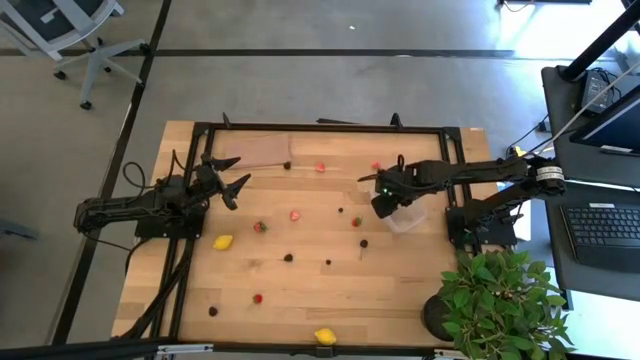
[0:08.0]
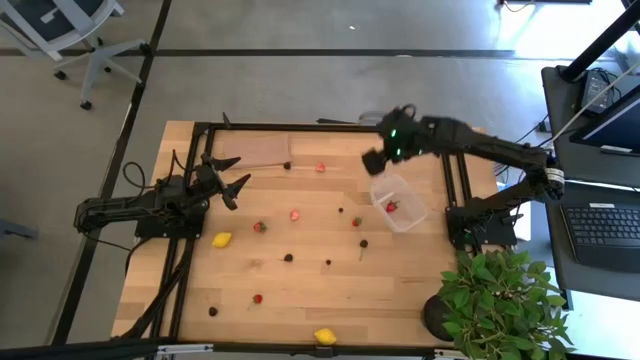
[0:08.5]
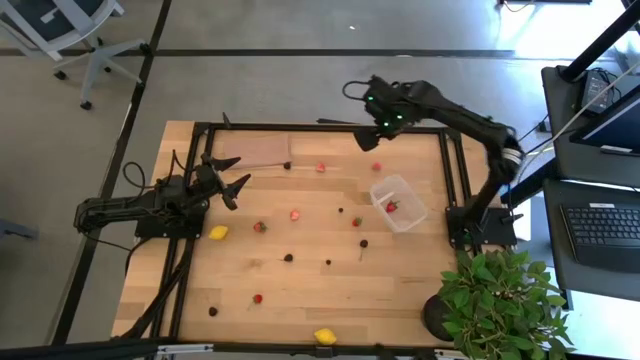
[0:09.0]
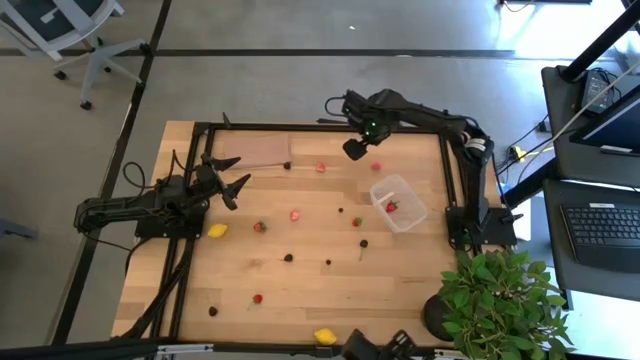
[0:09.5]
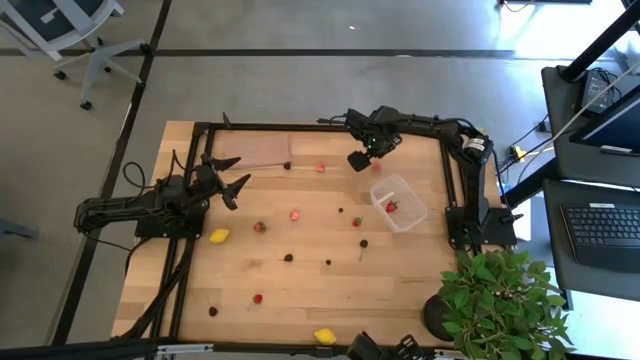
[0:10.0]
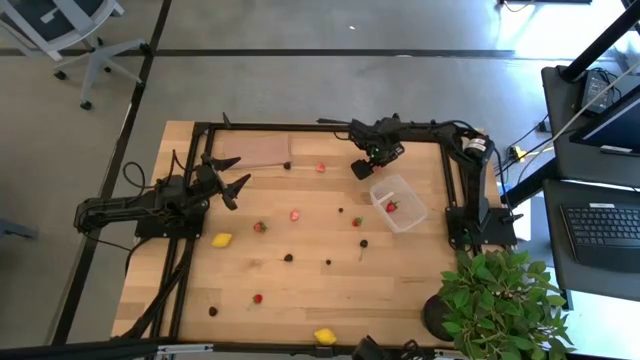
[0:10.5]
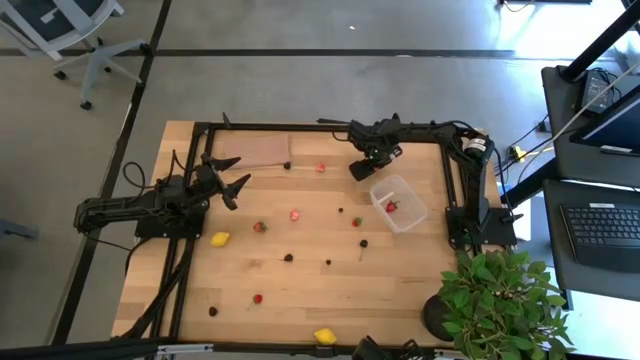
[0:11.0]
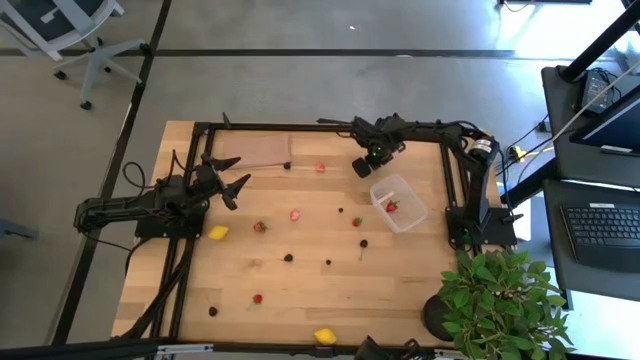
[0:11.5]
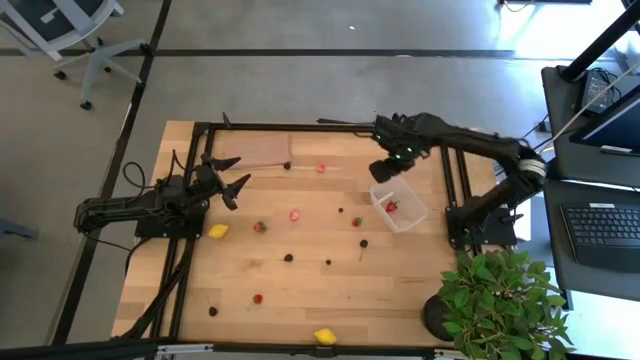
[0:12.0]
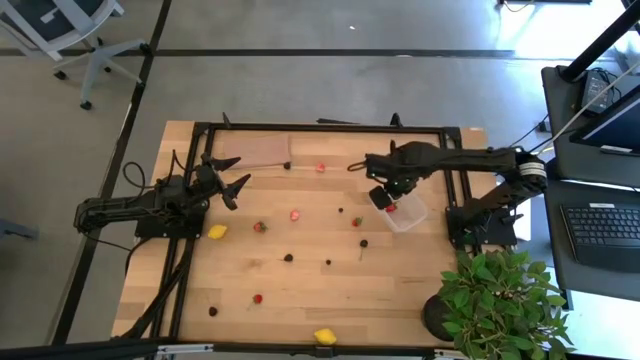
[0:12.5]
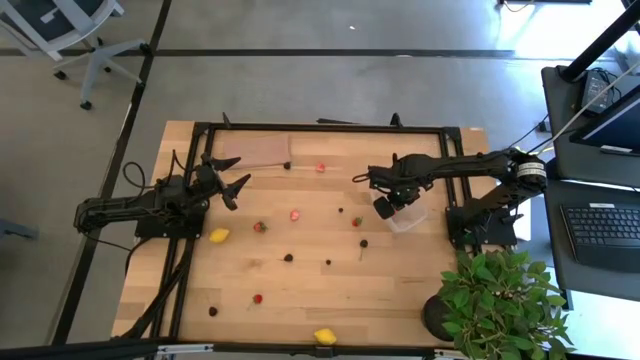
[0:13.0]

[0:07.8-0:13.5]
Task: Pick and placing Produce into tupperware
Put the peach into the transparent bin

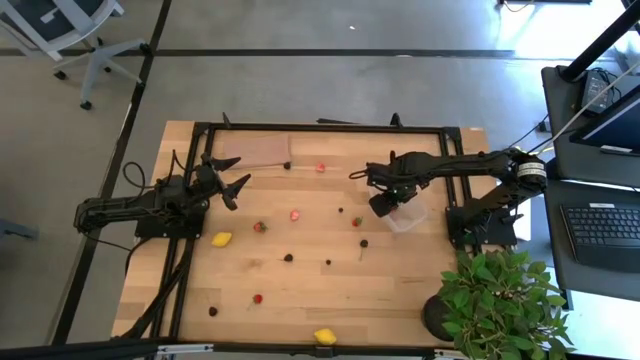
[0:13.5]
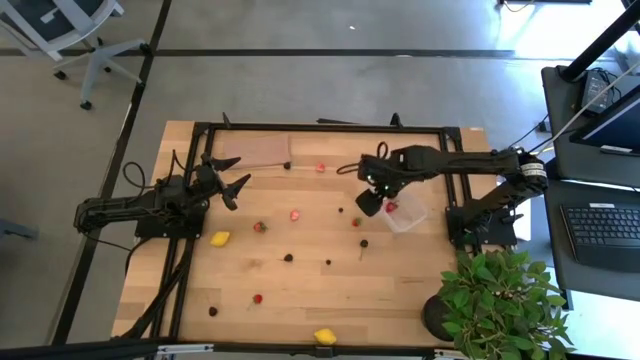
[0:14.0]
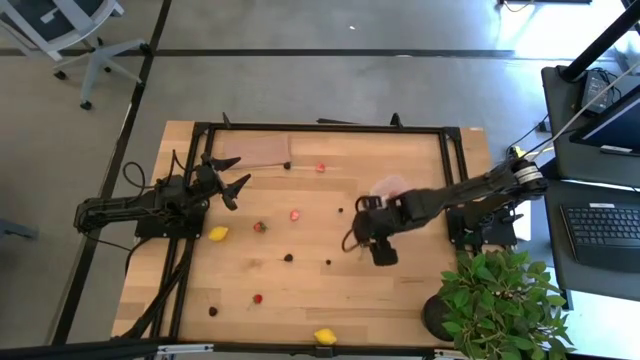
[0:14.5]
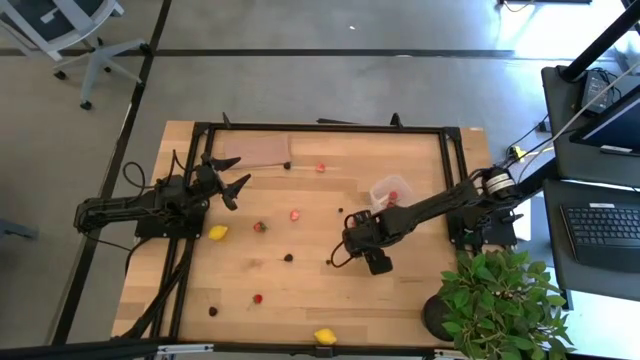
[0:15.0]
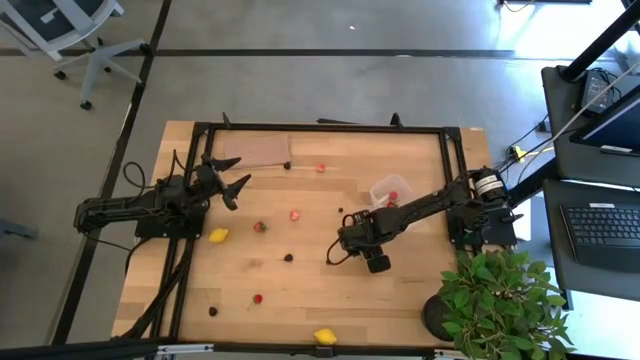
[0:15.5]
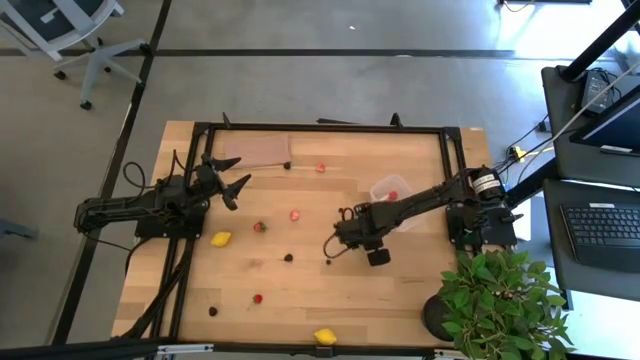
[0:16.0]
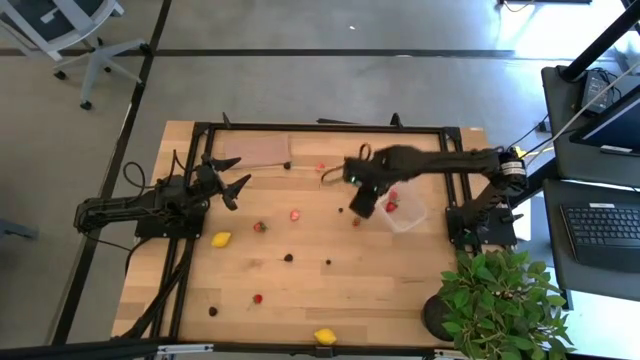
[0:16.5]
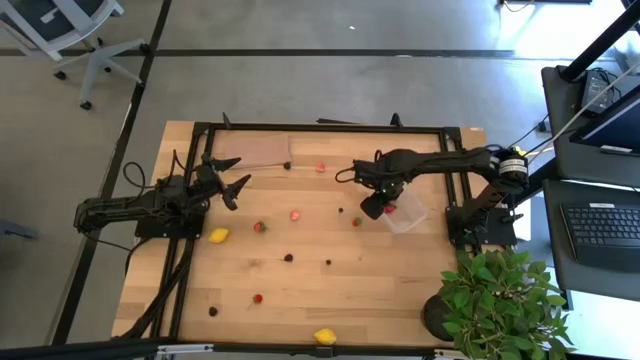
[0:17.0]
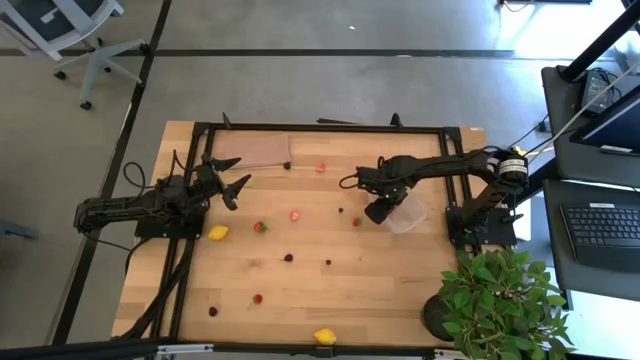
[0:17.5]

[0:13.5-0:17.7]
Put the black cherry into the transparent bin

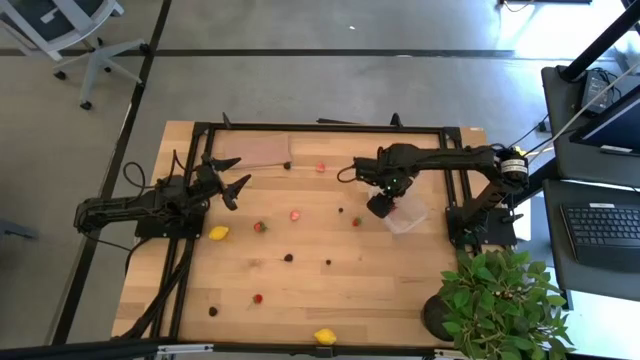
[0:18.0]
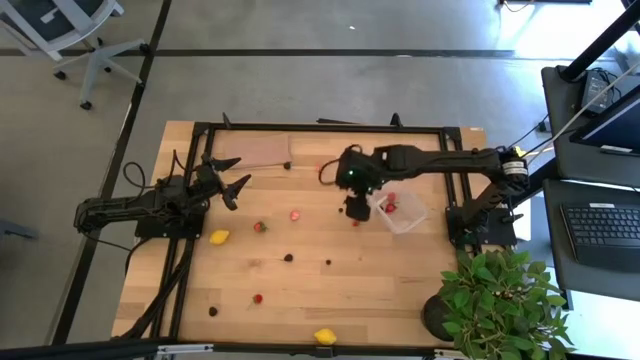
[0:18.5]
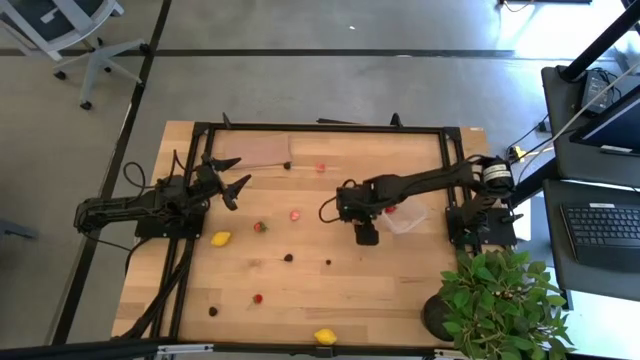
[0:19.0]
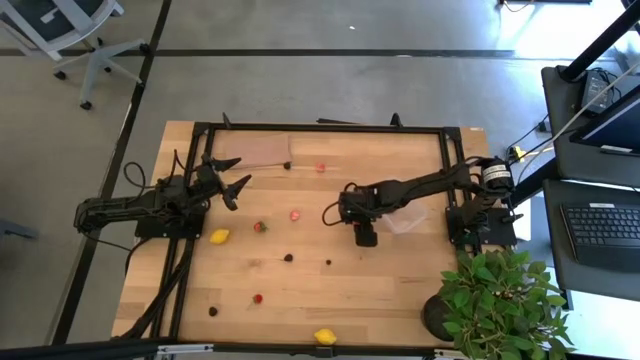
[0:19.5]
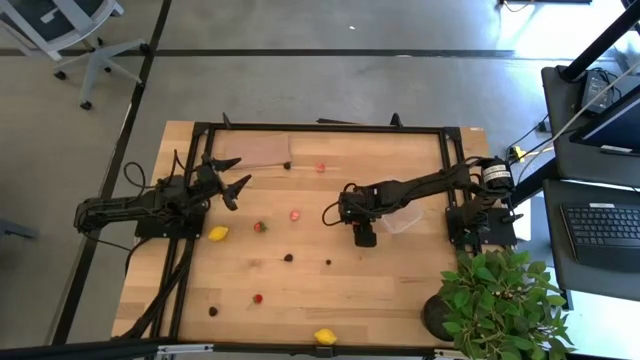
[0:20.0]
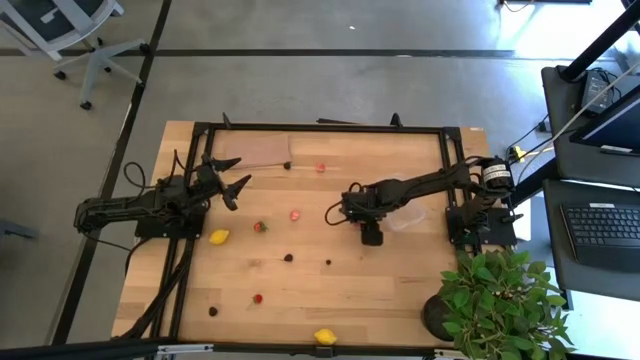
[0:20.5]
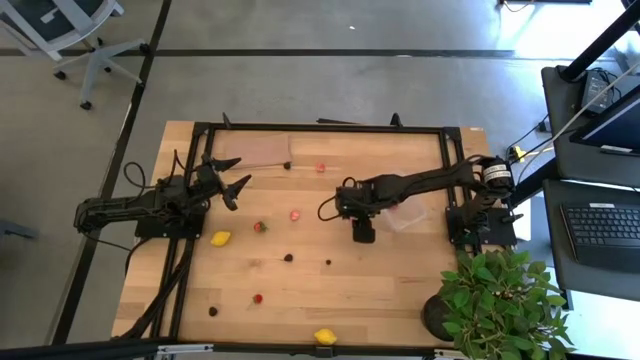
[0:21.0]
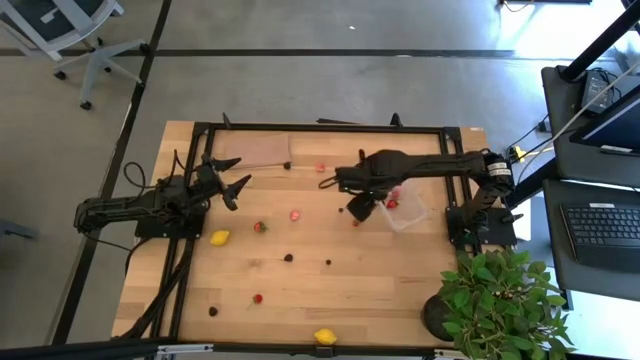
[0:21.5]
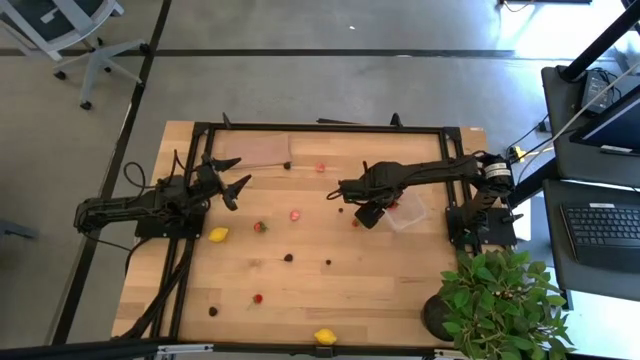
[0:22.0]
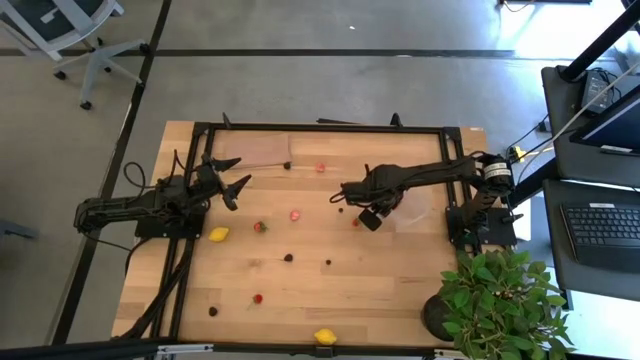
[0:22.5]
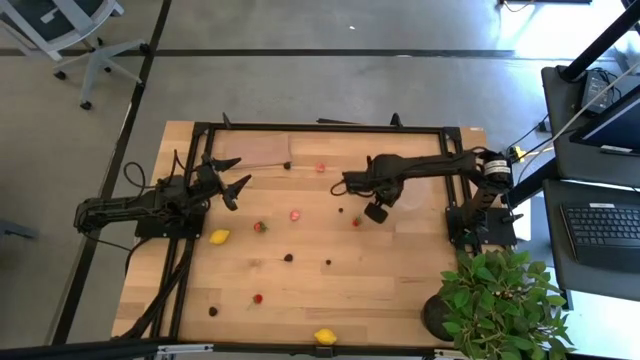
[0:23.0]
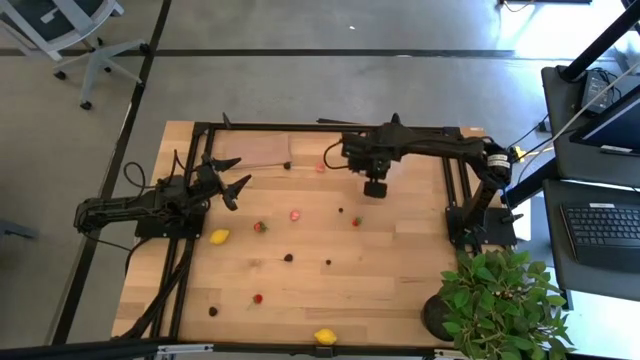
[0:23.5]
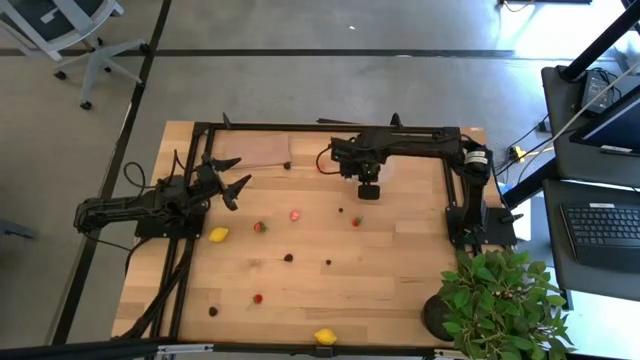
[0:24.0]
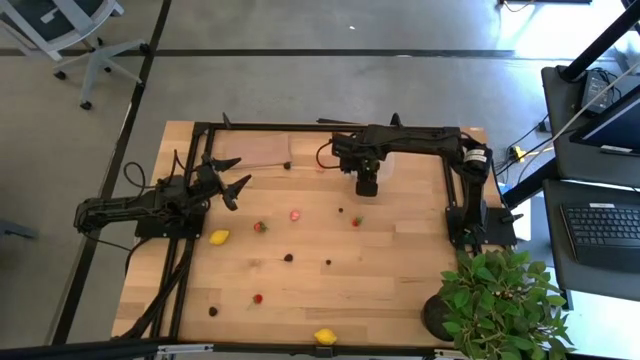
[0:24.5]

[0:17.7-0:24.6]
Move the transparent bin to the top center of the table

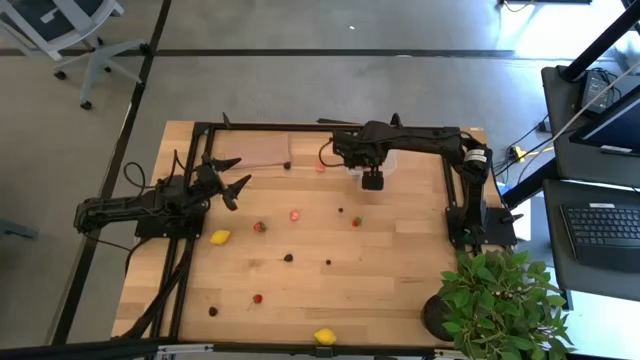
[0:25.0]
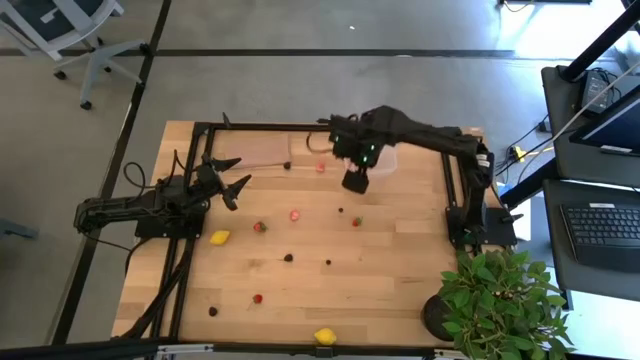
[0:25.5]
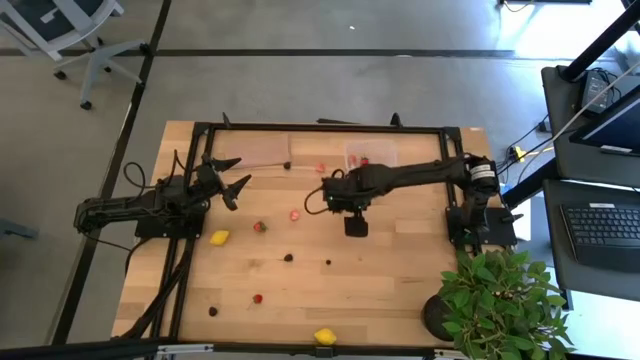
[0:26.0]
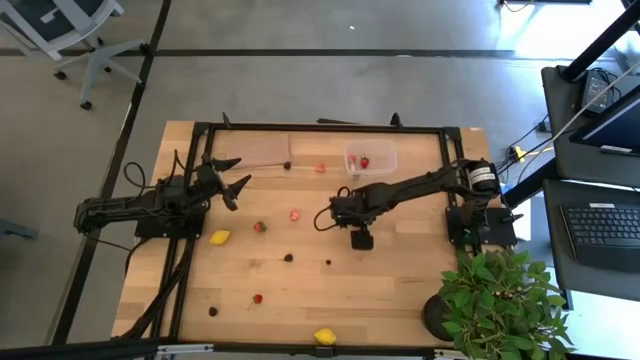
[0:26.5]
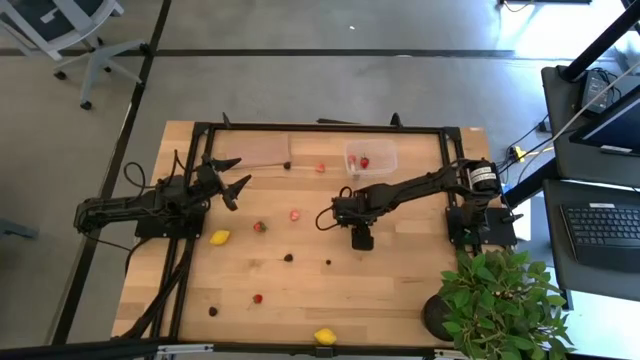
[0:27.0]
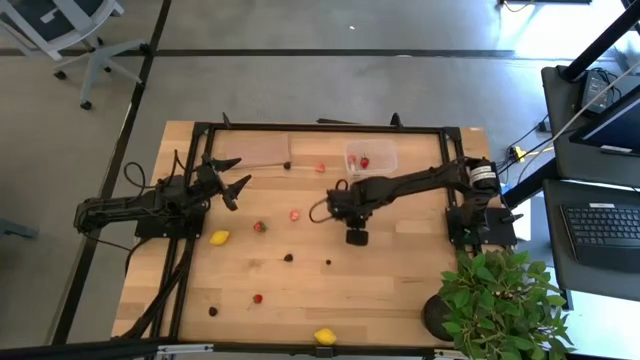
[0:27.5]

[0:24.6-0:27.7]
Put the strawberry into the transparent bin
